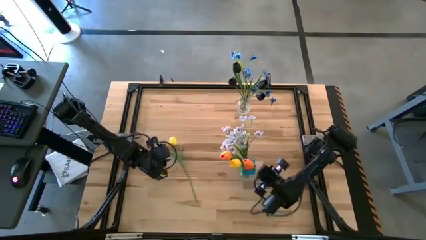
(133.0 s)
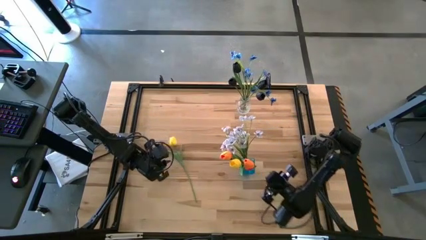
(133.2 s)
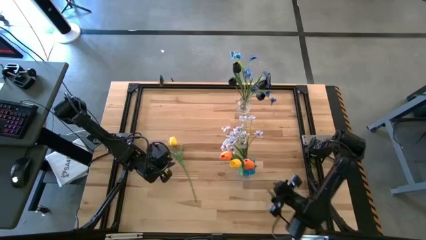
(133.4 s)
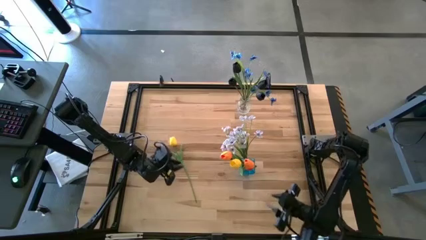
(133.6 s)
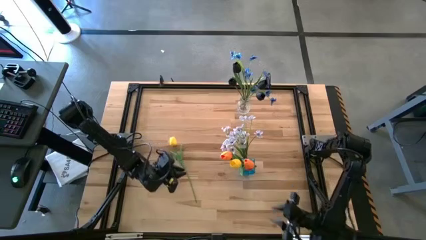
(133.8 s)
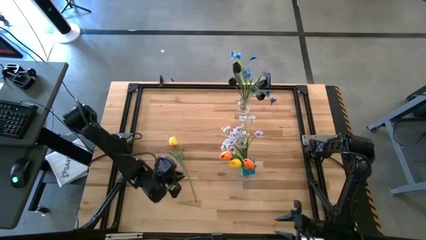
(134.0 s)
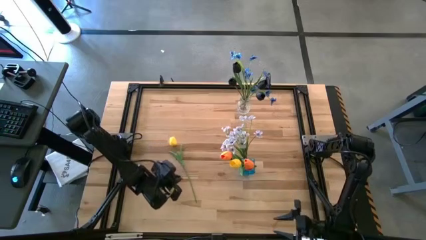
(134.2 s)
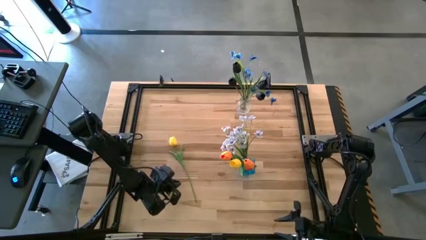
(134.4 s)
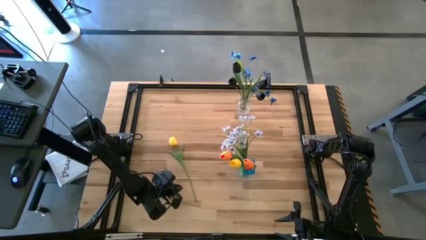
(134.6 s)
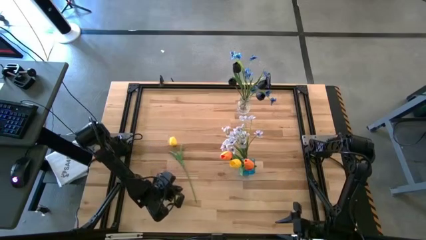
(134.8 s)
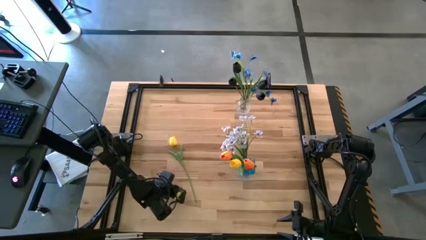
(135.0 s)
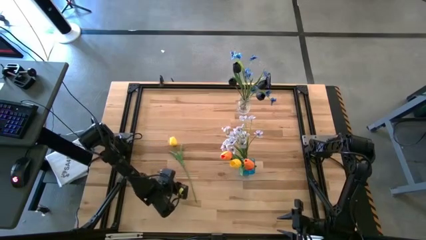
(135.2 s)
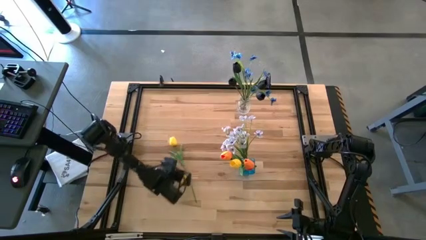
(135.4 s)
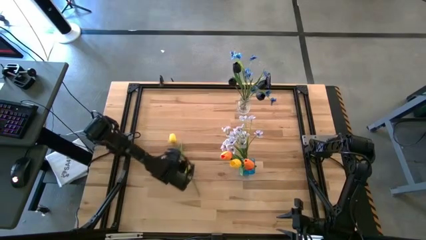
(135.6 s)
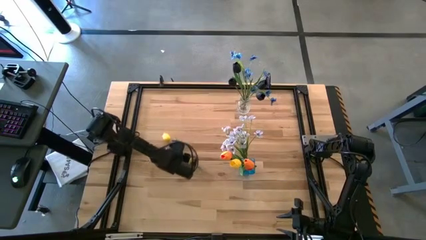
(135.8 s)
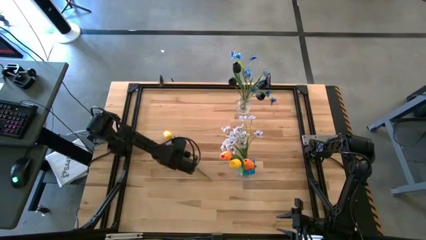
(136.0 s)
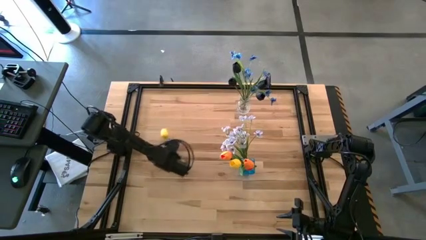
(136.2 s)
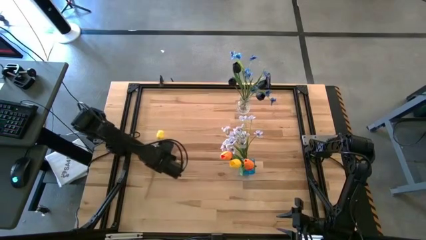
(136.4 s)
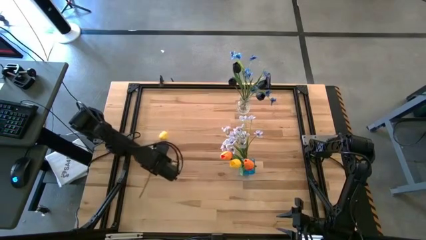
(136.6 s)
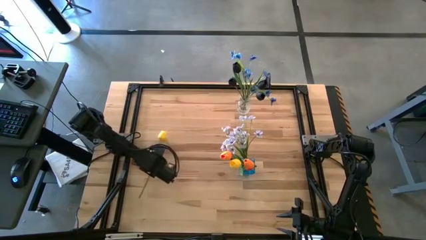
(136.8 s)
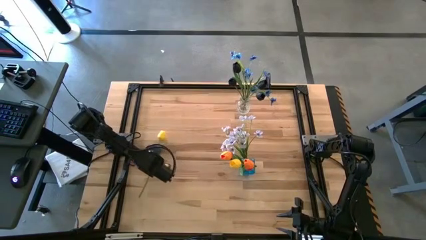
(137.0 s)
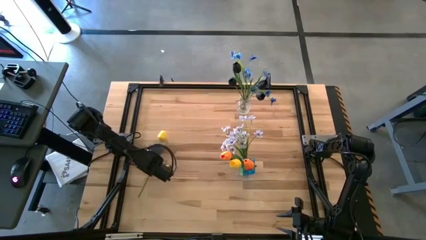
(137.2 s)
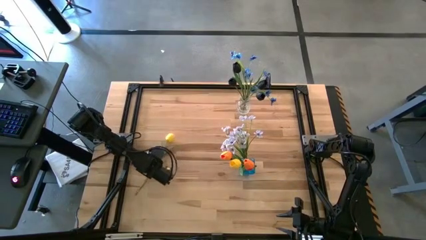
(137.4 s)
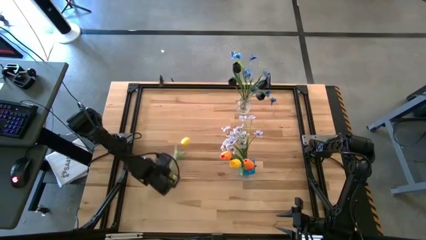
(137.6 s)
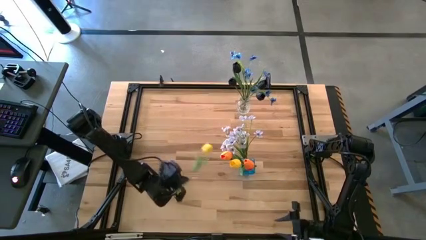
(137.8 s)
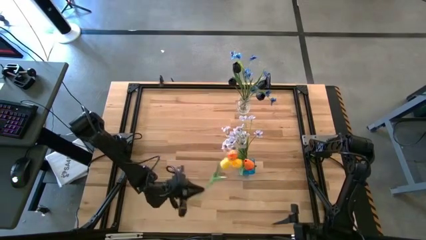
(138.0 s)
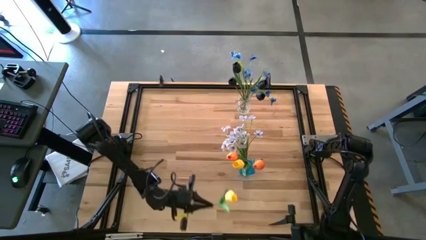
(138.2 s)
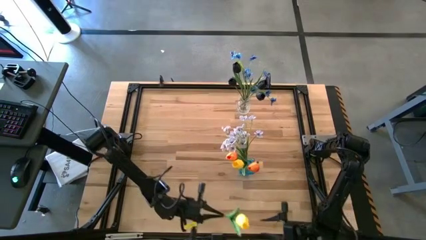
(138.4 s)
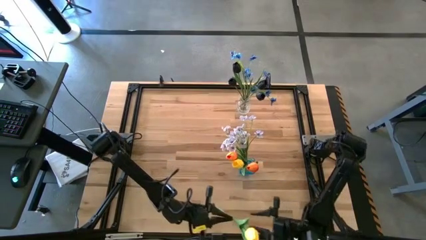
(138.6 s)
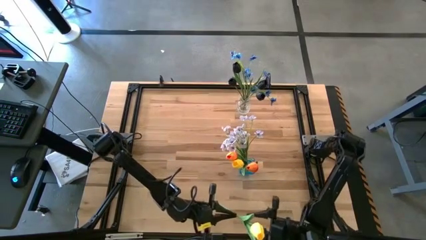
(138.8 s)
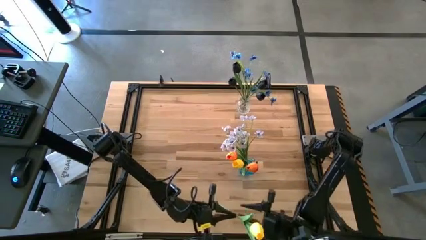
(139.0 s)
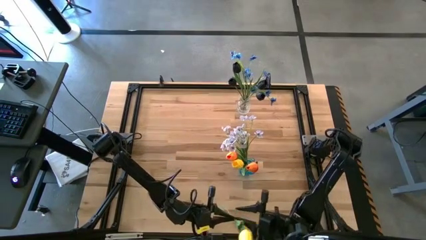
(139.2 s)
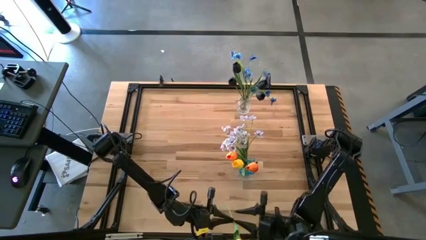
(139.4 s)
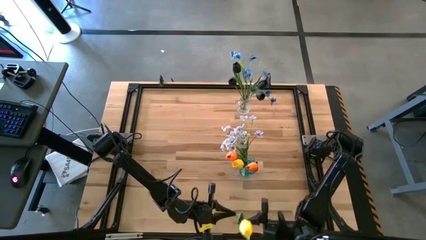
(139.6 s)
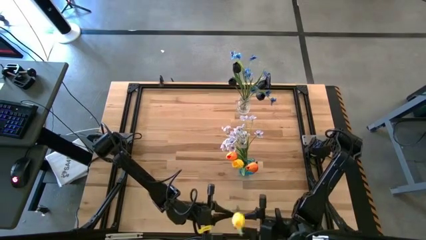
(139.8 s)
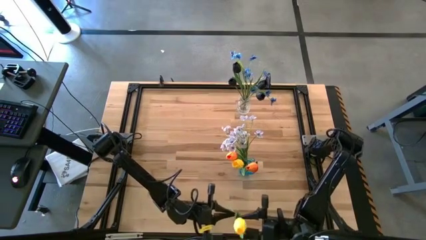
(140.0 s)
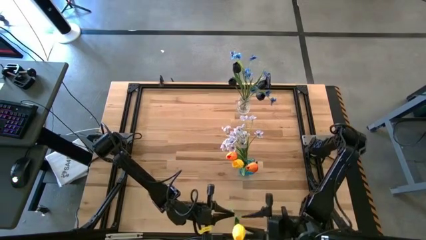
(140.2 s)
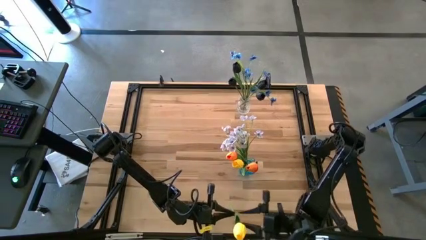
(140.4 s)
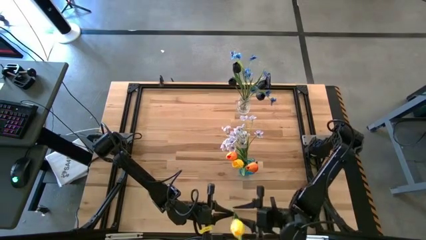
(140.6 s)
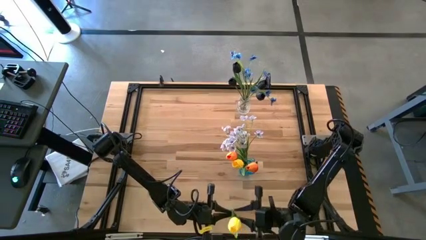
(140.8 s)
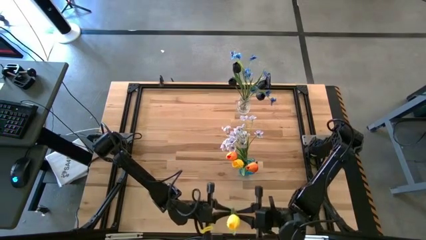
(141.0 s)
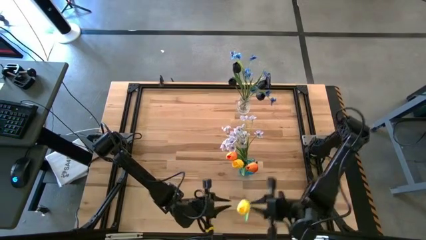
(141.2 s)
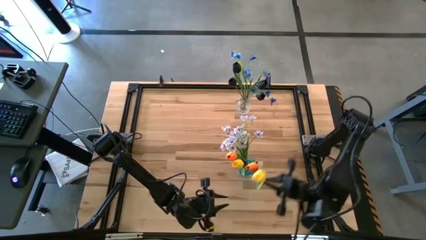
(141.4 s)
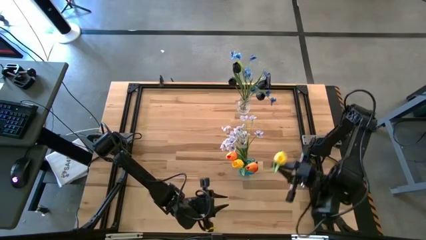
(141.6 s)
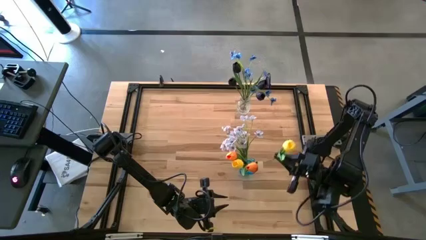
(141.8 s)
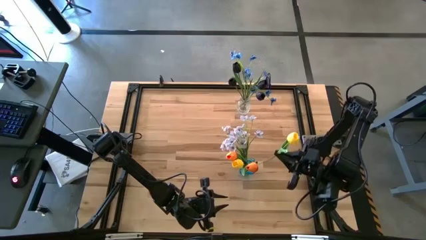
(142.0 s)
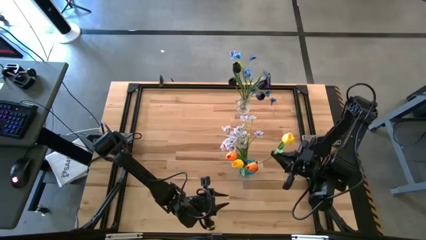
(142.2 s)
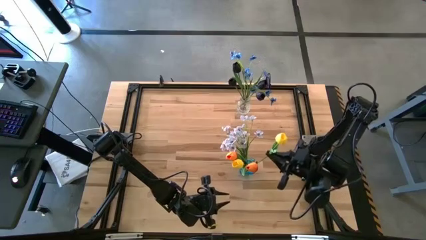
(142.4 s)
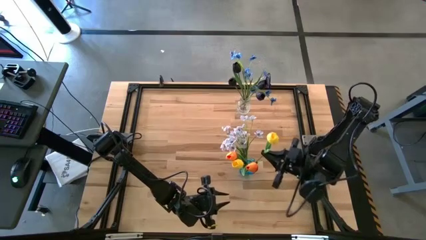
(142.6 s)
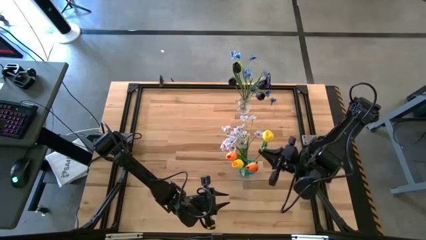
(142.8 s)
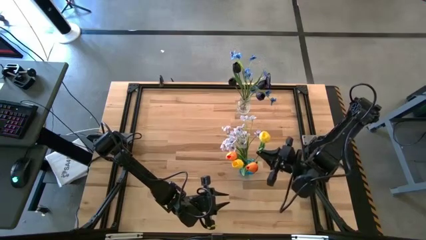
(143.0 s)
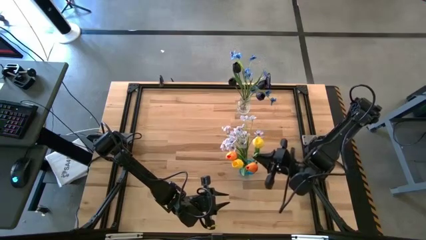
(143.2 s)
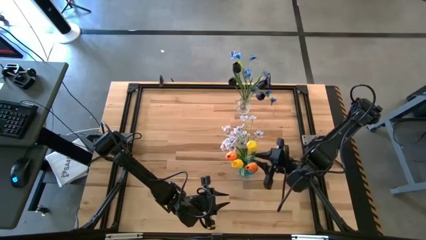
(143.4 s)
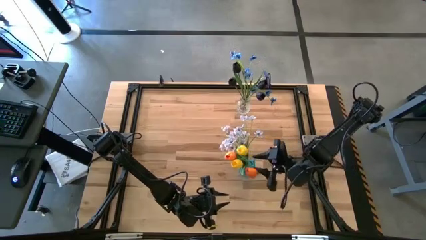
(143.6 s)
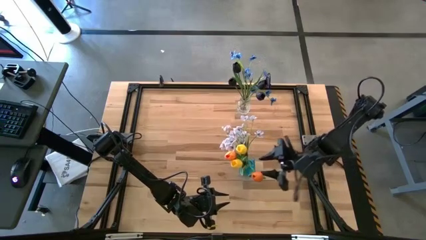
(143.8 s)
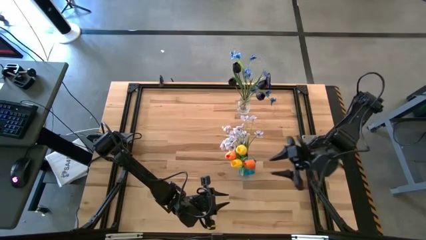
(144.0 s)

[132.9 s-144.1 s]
Task: Sort flowers into vase by color
Put the yellow tulip into the blue flower vase

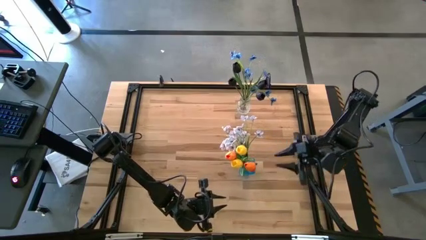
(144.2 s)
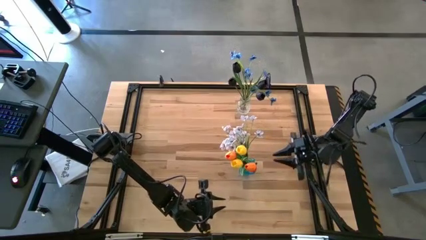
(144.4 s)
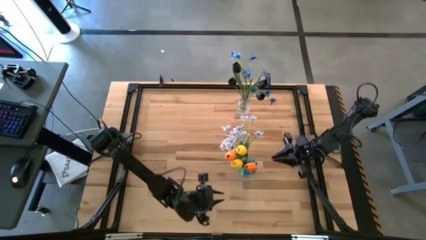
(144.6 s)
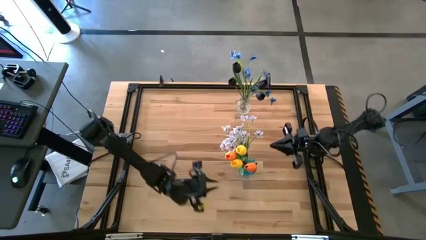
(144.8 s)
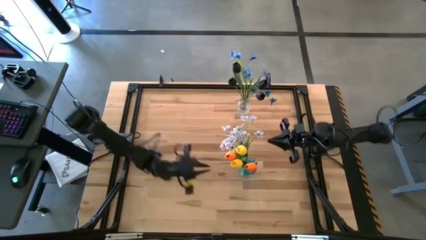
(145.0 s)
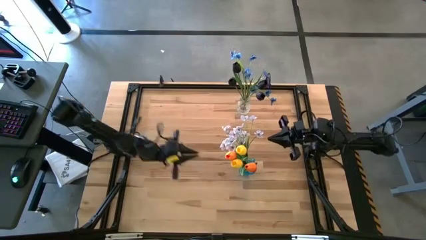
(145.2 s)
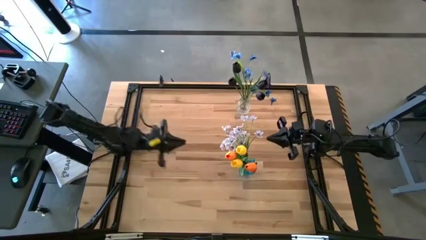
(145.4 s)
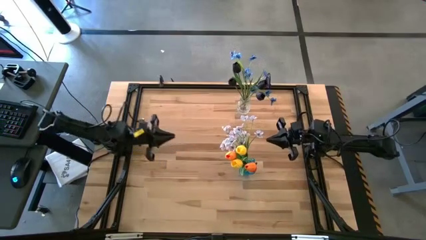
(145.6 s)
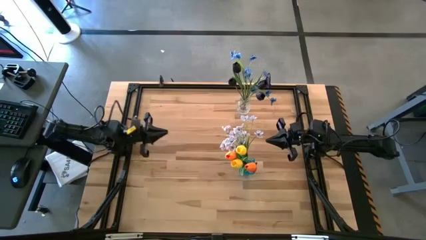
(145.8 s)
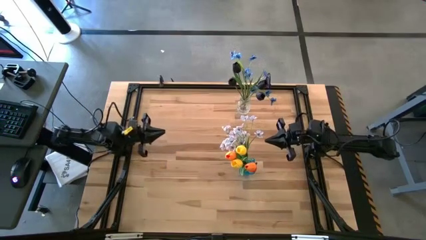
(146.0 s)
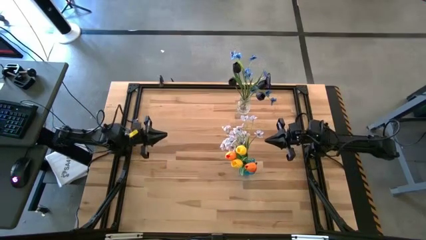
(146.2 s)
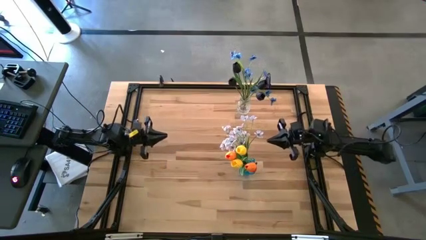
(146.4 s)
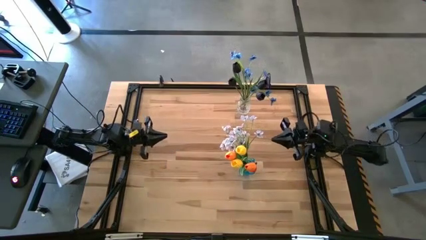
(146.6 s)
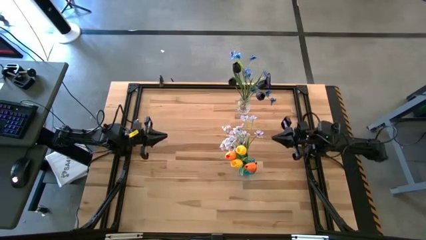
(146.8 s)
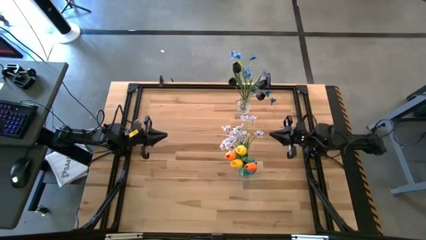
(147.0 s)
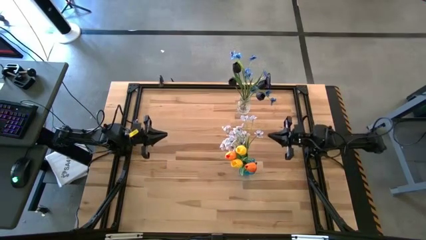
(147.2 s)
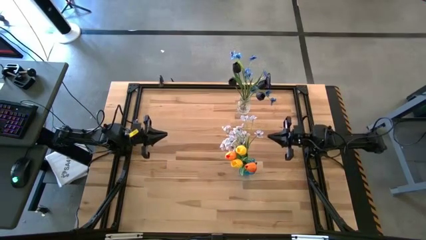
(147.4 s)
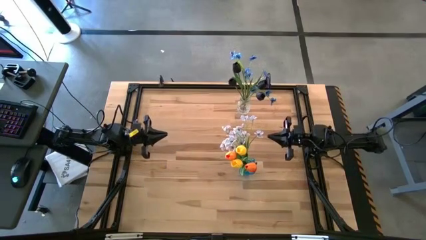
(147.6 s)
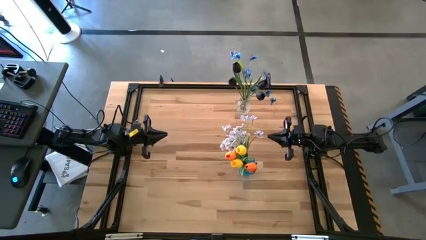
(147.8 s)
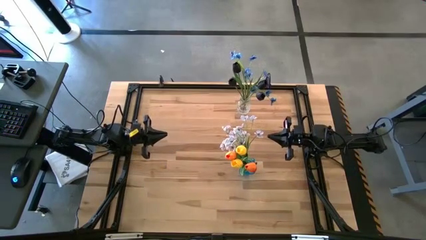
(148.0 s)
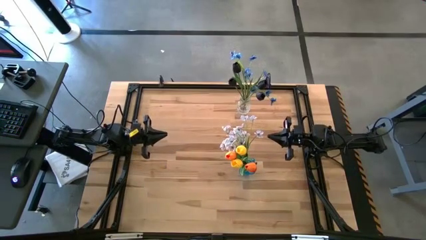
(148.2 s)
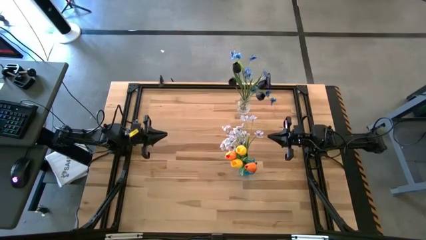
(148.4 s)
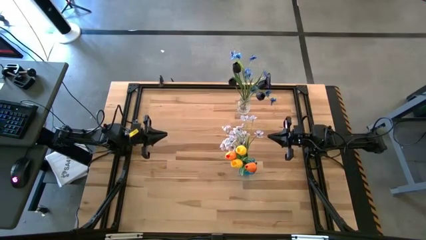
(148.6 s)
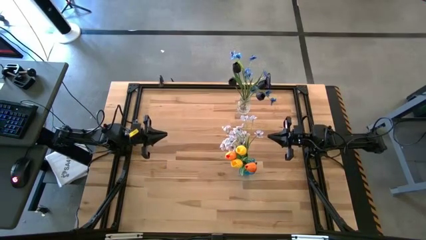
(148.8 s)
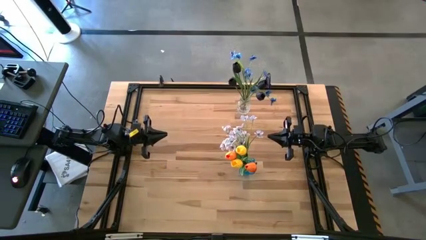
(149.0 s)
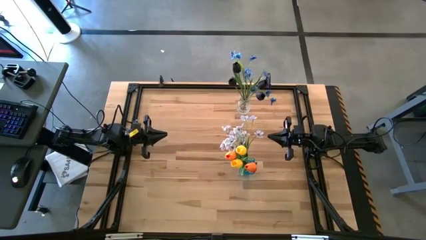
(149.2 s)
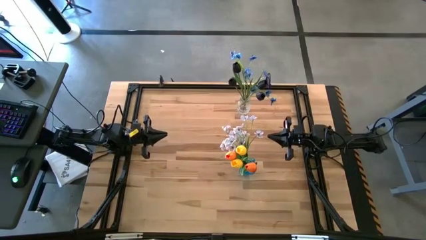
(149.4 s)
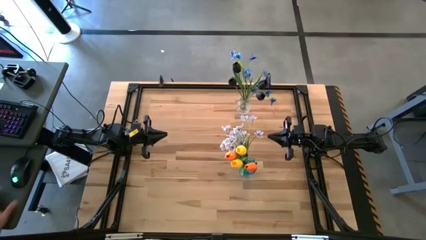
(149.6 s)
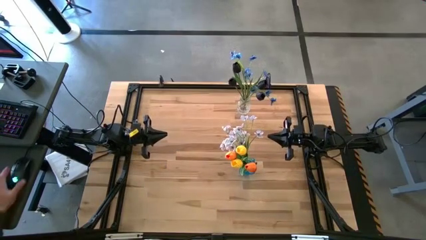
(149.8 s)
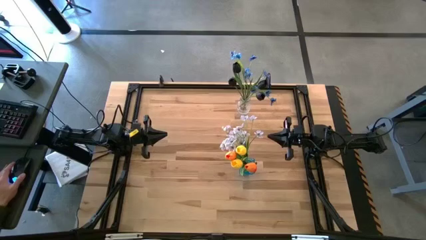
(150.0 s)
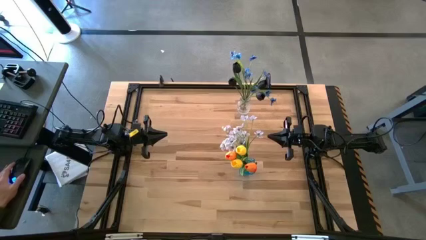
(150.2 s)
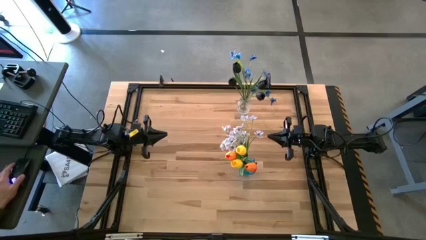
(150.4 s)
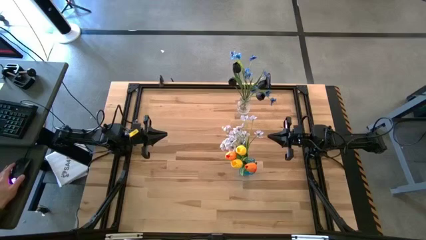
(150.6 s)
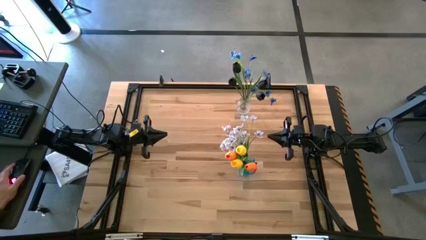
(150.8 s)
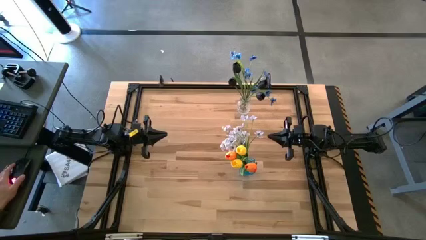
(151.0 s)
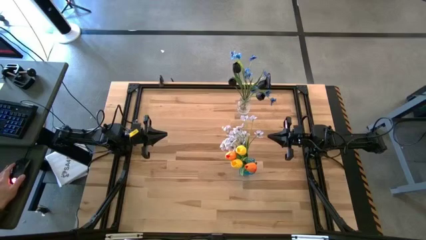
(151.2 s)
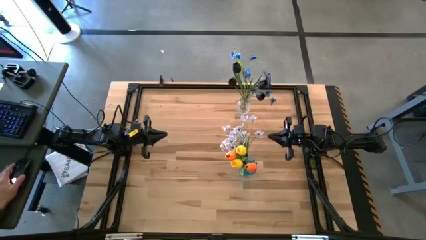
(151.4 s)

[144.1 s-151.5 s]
Return to Home Position
